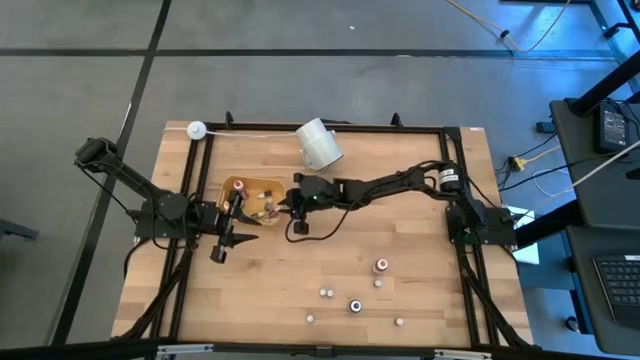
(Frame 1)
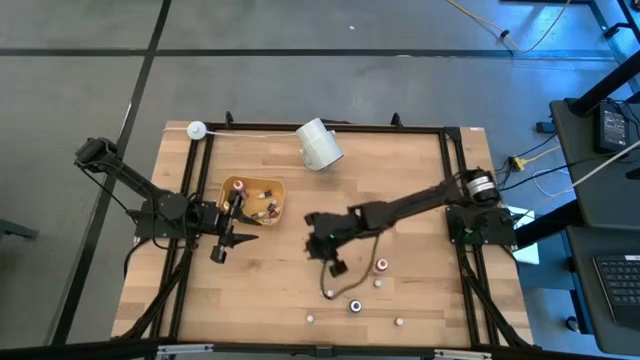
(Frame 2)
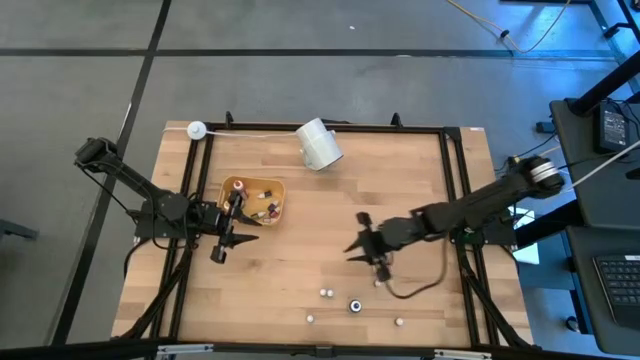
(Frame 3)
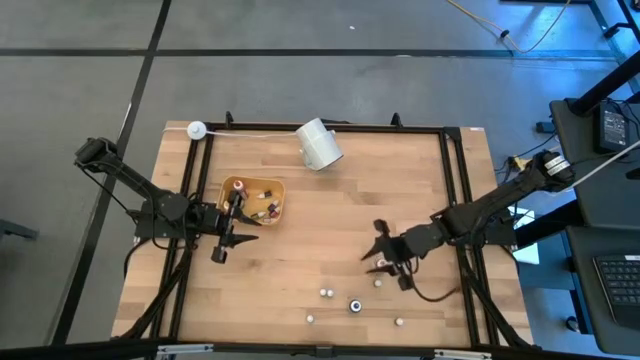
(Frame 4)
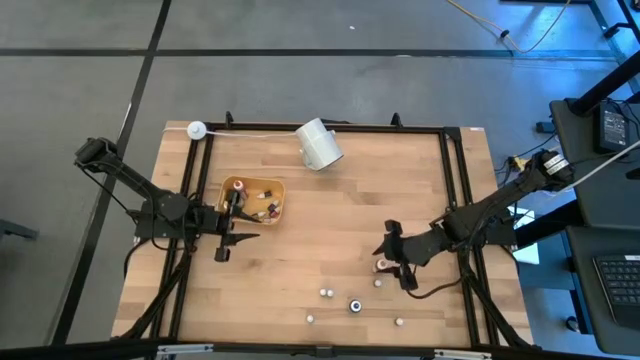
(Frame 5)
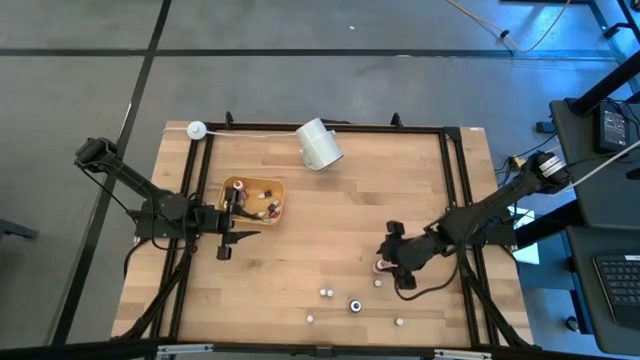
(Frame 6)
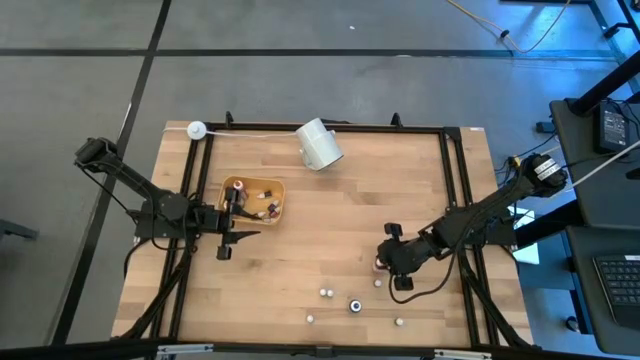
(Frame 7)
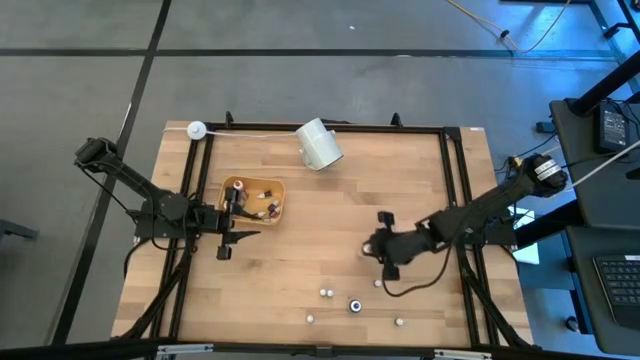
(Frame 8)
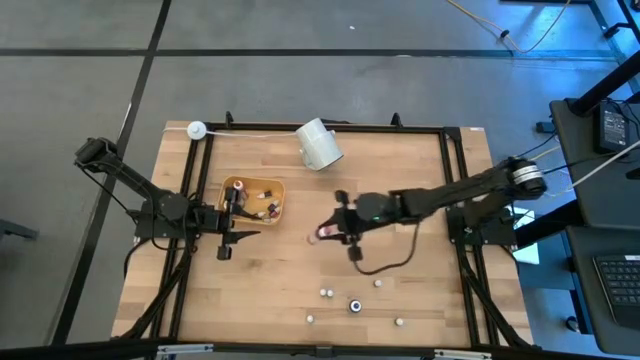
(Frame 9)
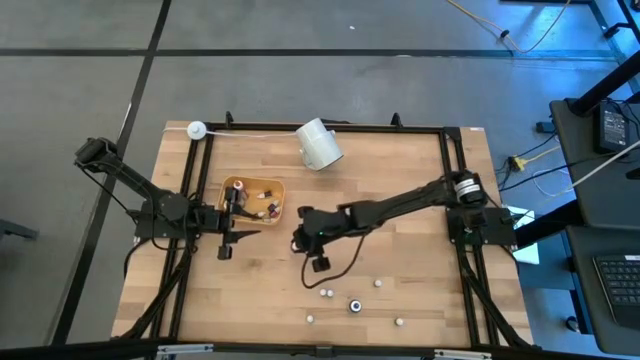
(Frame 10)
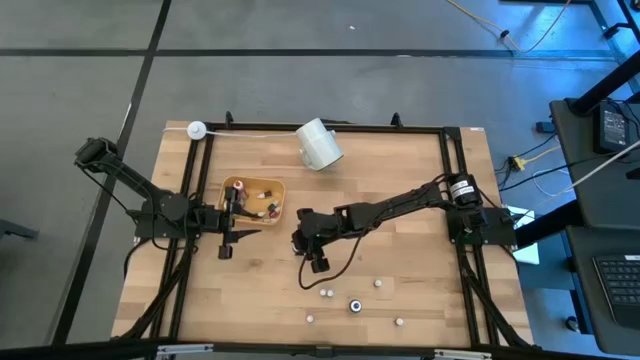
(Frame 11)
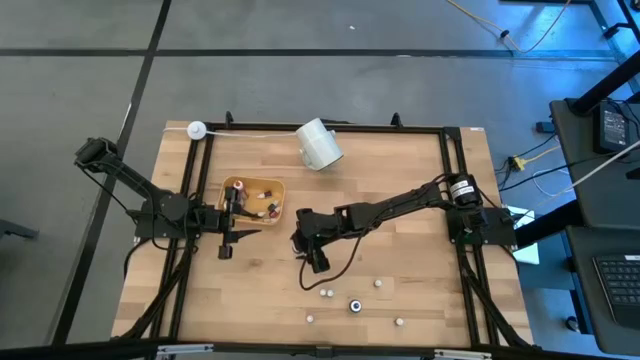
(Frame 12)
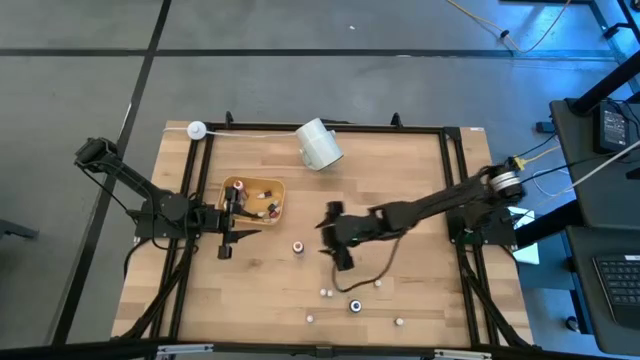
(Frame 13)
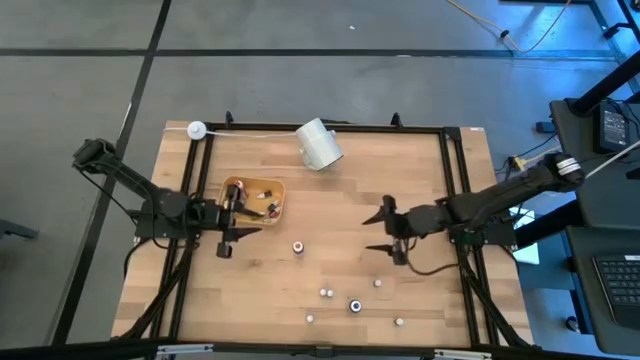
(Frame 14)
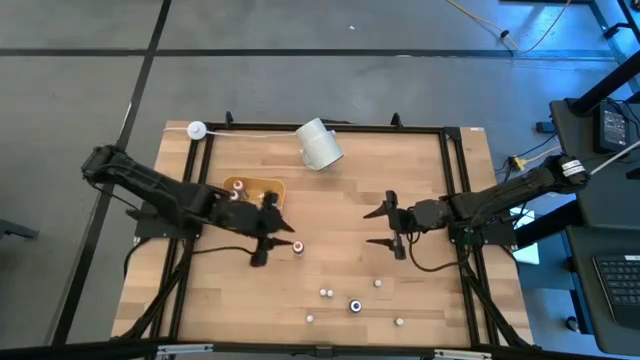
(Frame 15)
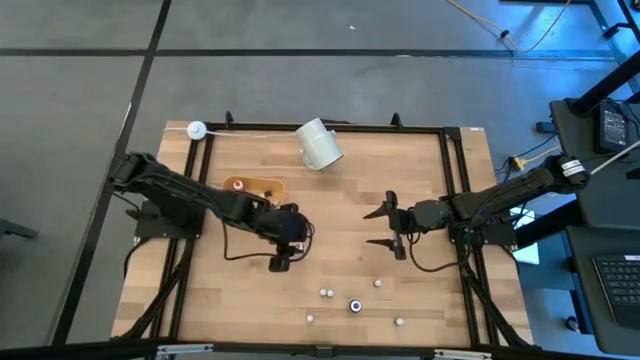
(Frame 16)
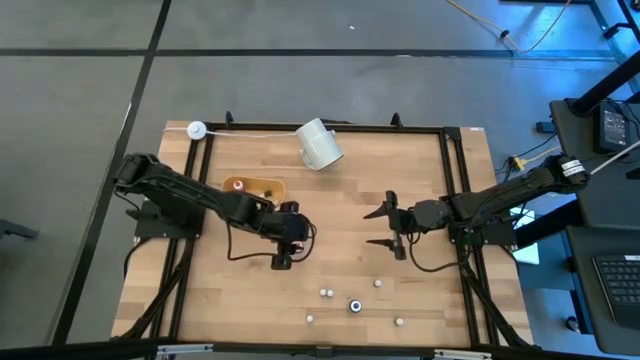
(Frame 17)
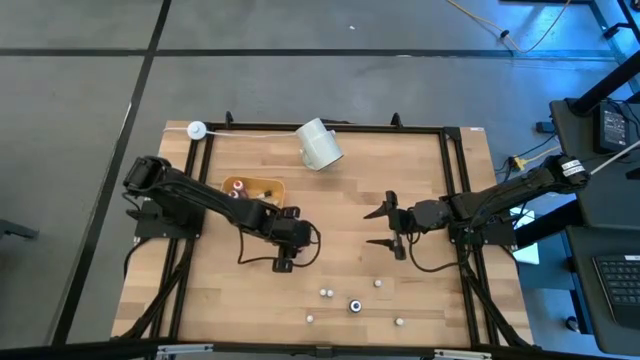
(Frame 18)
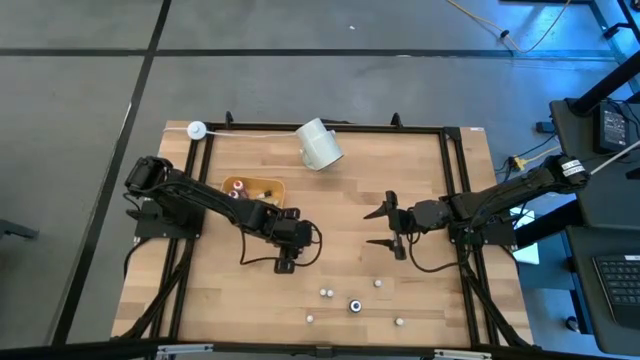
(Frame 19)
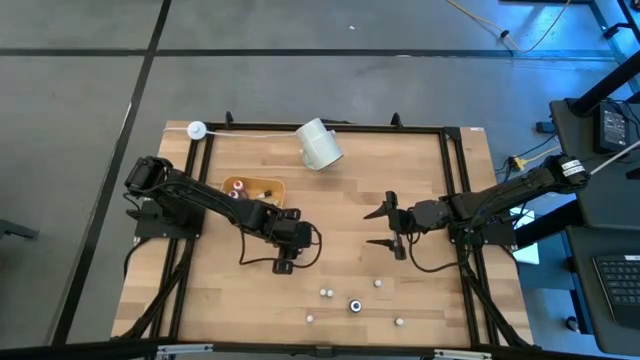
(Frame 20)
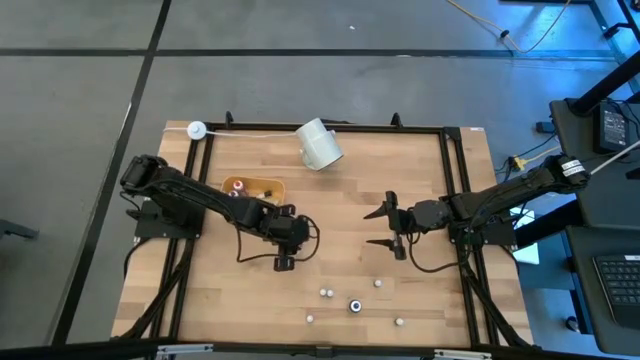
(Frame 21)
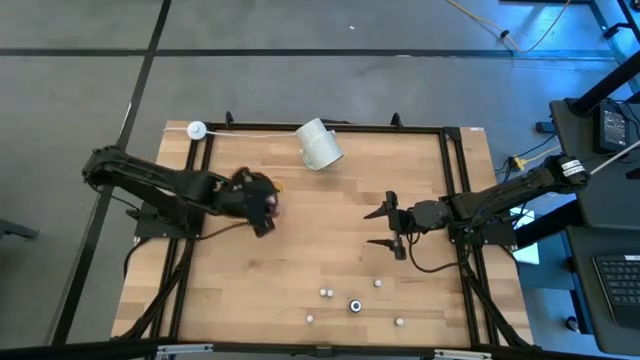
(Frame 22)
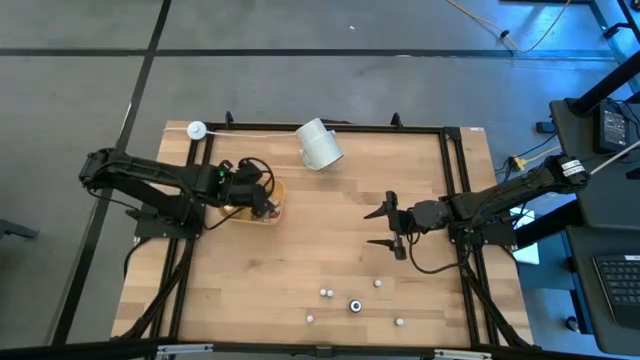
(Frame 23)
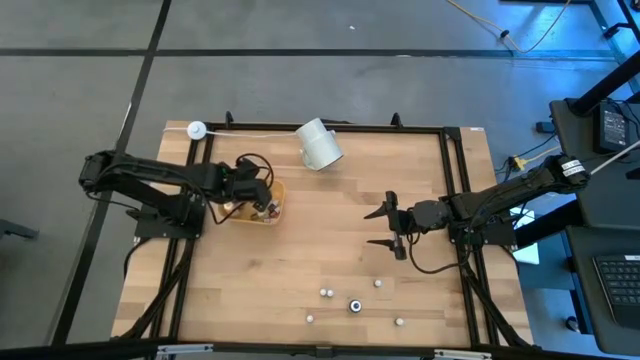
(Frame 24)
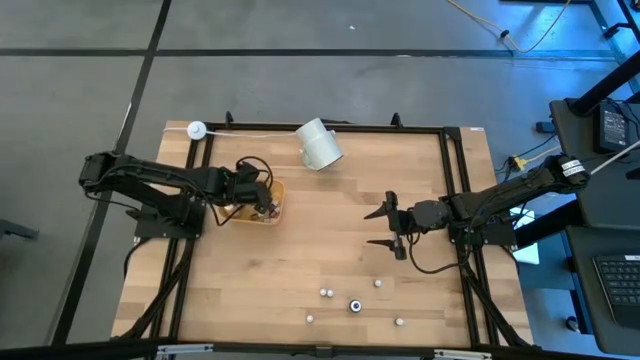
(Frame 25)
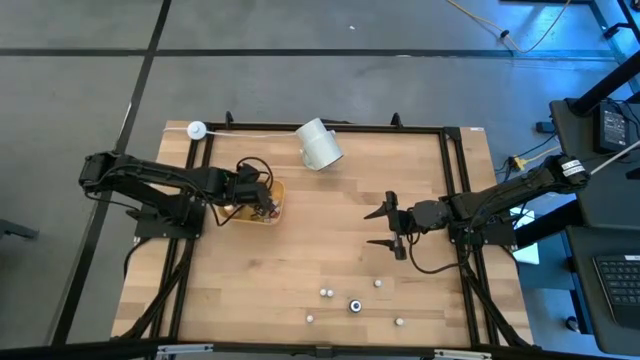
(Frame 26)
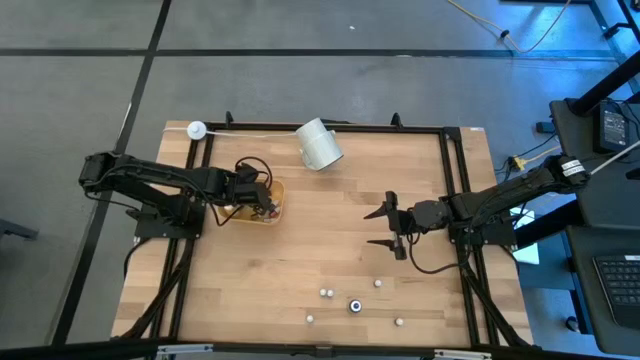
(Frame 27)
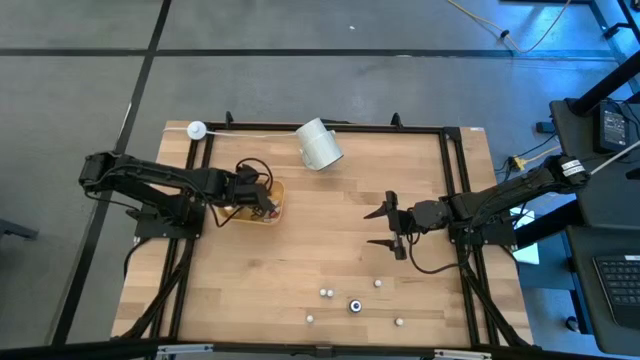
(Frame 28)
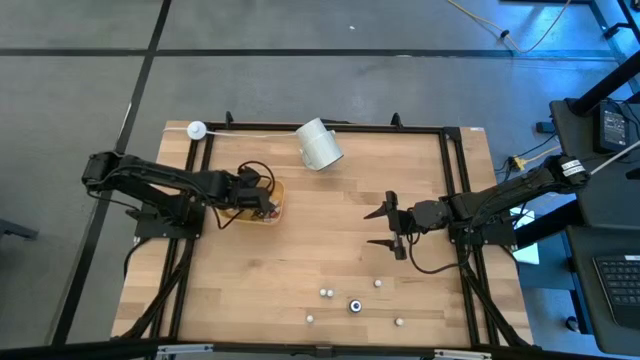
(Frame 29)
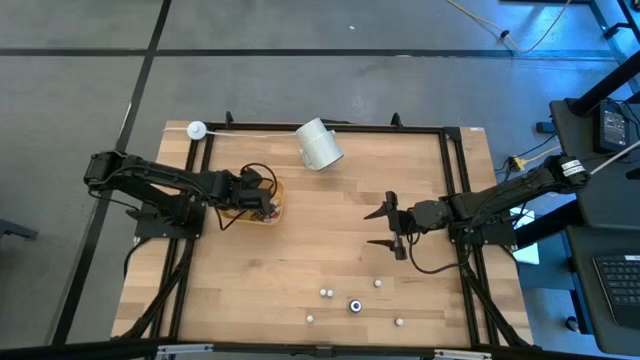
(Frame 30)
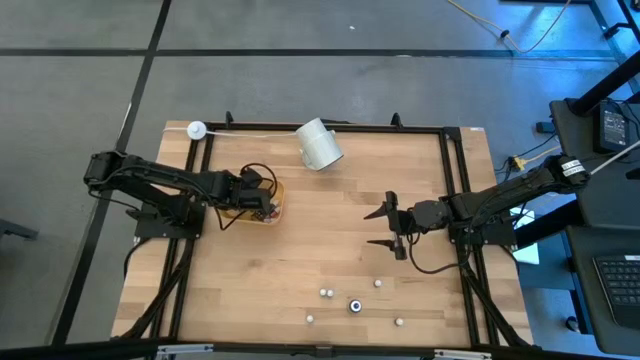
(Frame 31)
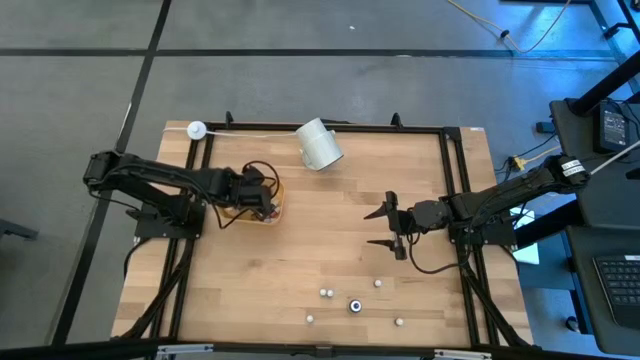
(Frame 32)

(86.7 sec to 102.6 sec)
Task: Pick & Place food coloring
Put the large pink food coloring bottle into the bin

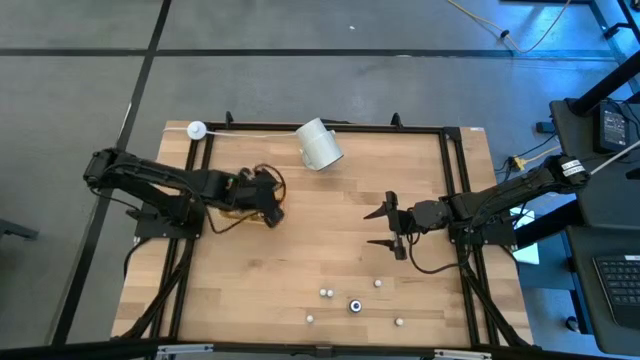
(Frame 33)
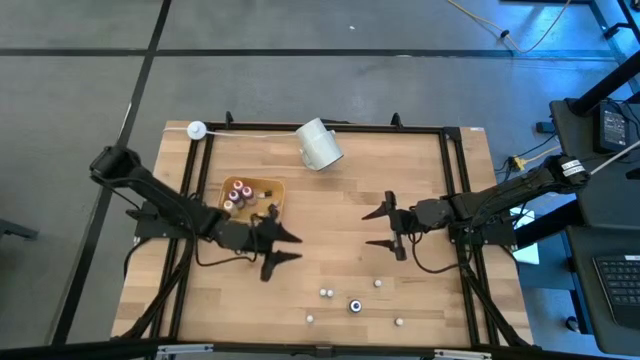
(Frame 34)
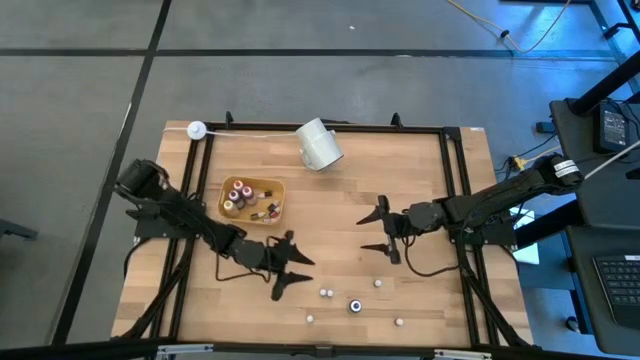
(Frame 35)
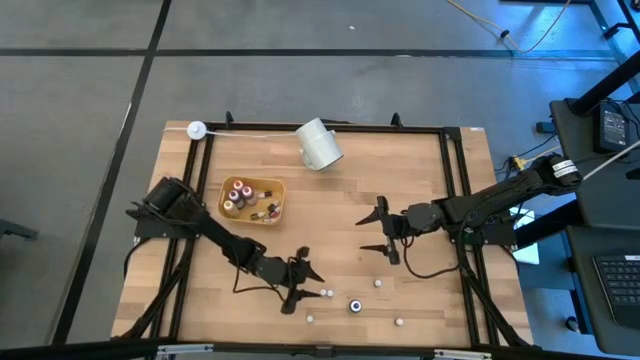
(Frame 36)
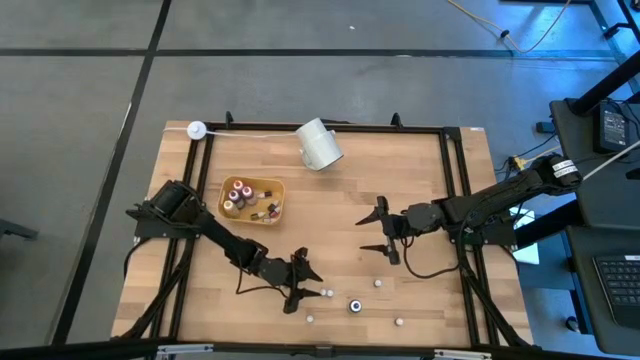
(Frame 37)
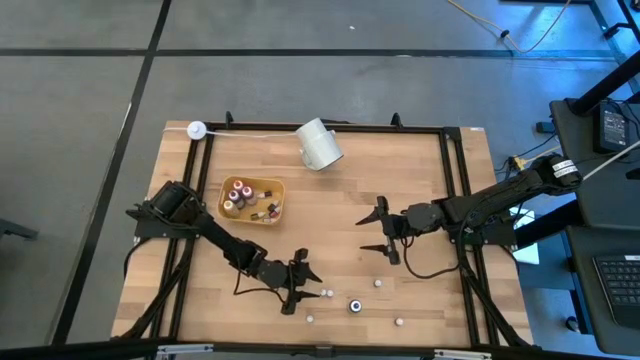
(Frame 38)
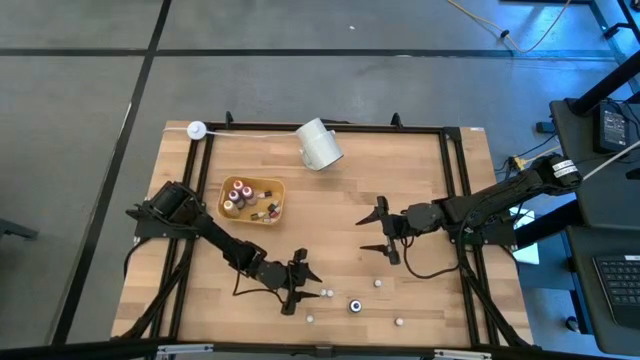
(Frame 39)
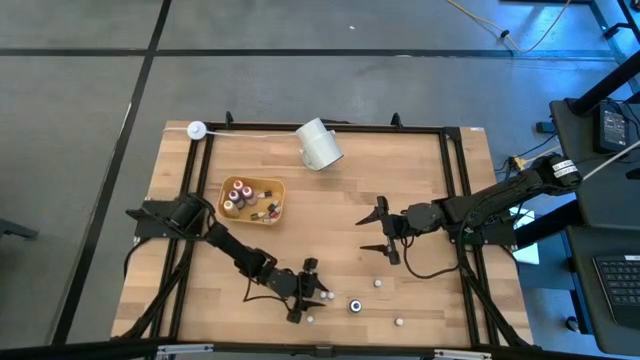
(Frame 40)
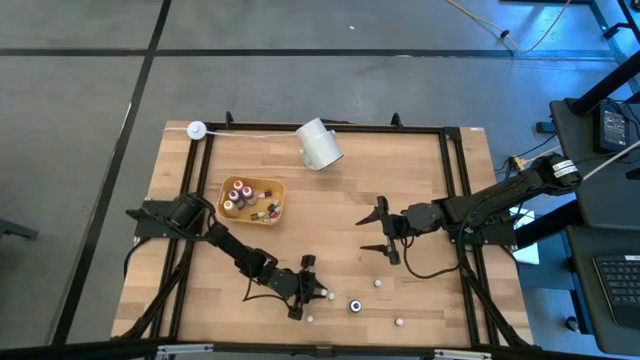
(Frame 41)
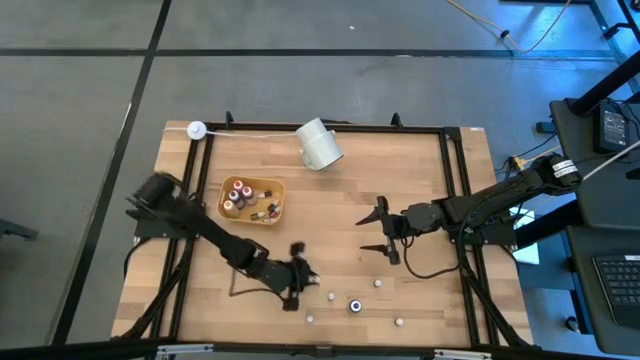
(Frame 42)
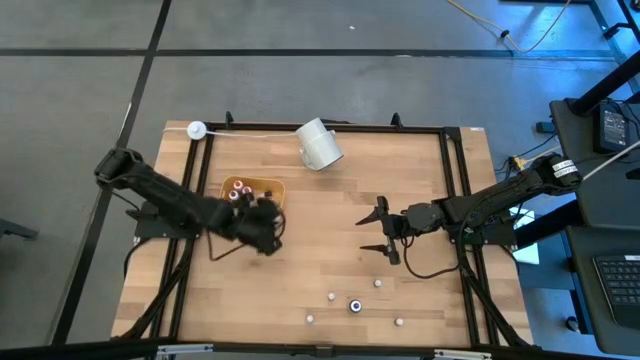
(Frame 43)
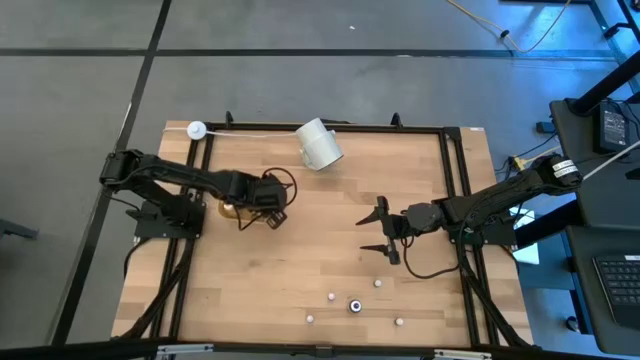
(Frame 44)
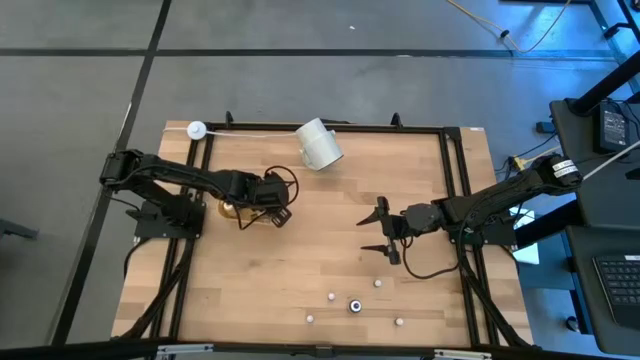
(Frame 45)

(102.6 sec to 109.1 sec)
Put the small green food coloring bottle into the bin
